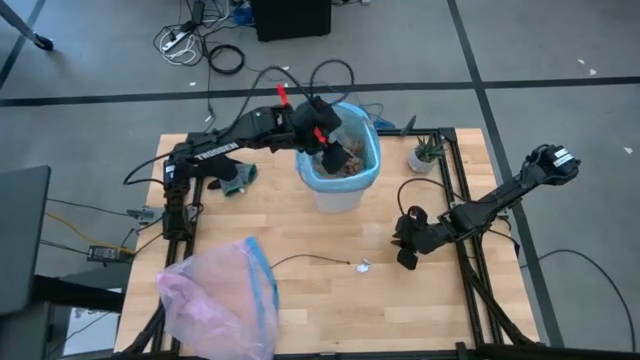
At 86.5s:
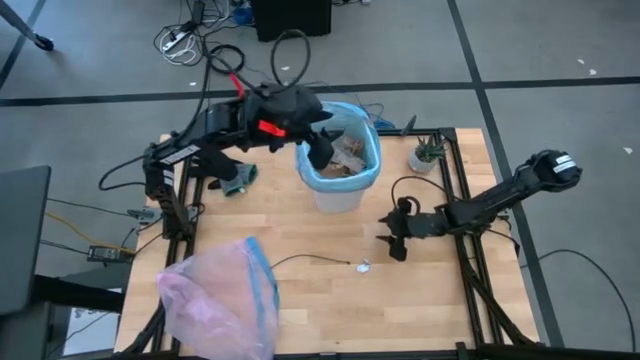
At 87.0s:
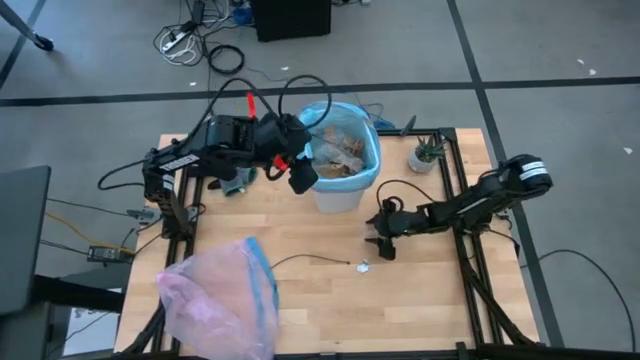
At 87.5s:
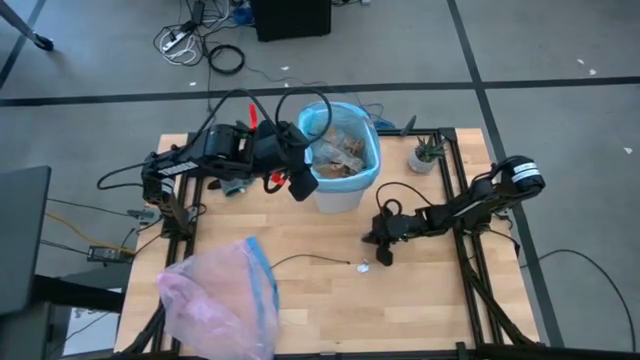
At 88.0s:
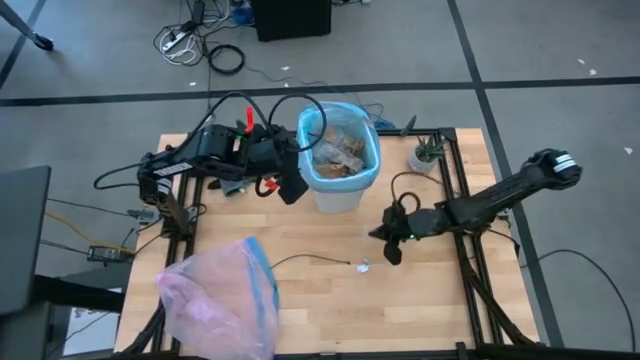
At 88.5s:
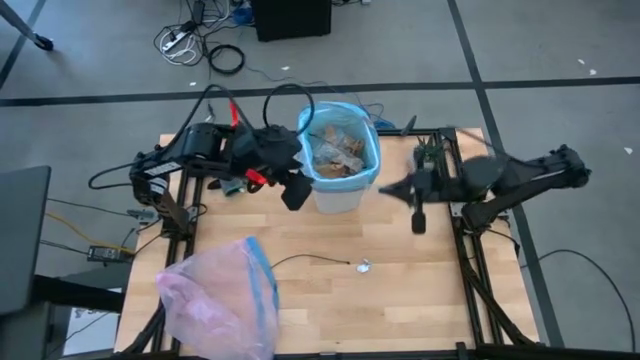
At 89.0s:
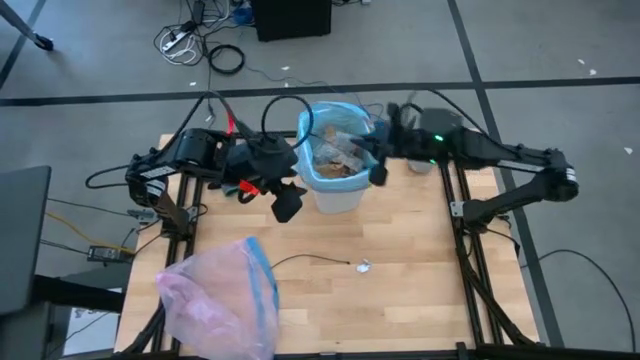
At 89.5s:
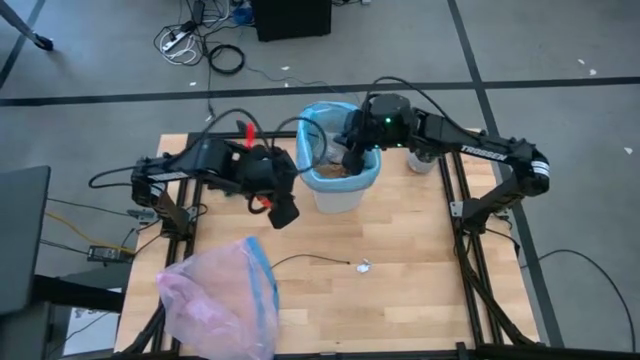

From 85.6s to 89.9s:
Task: place trash/remove bag and relplace
Put the transparent plastic into the trash bin

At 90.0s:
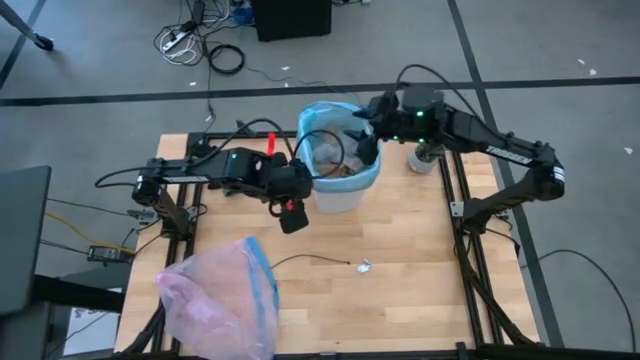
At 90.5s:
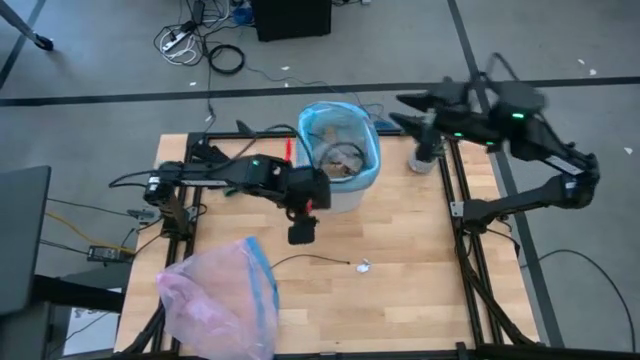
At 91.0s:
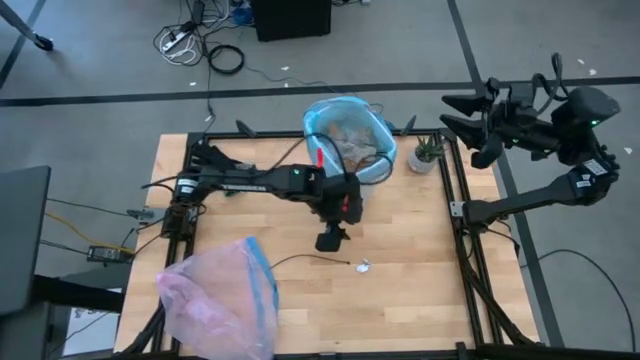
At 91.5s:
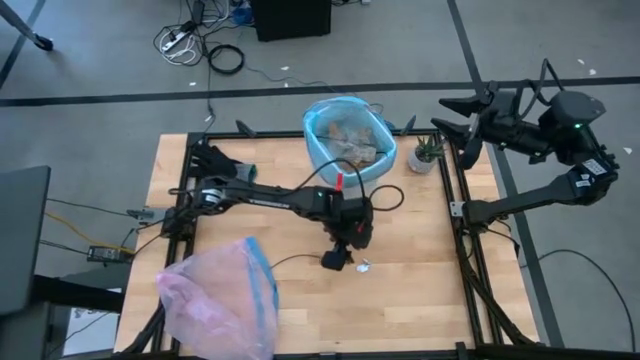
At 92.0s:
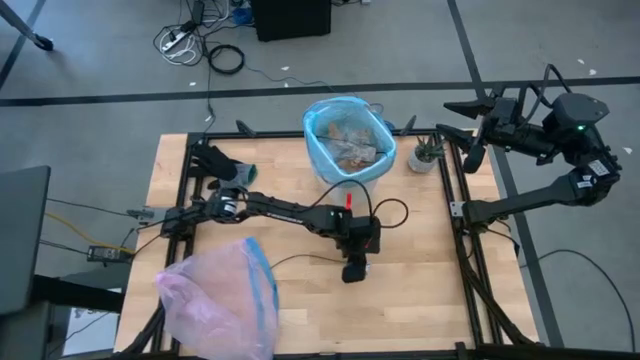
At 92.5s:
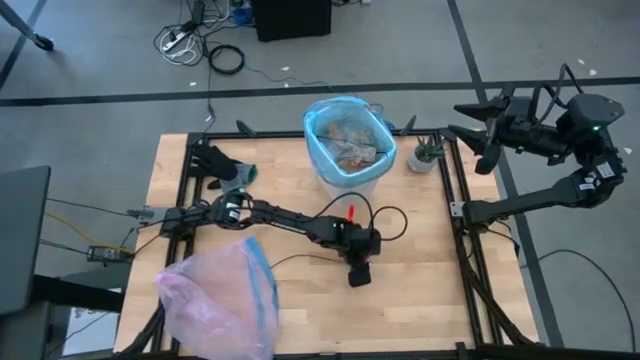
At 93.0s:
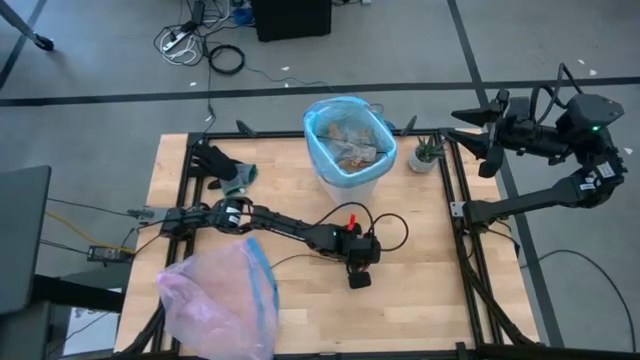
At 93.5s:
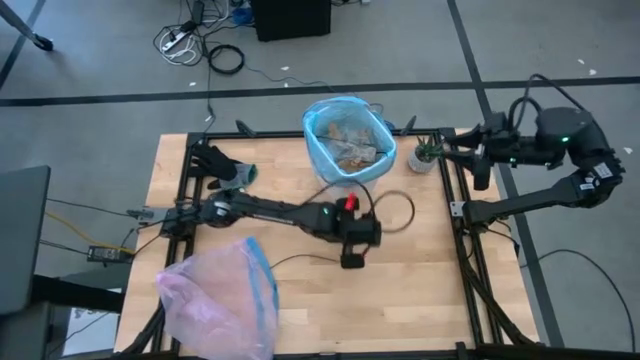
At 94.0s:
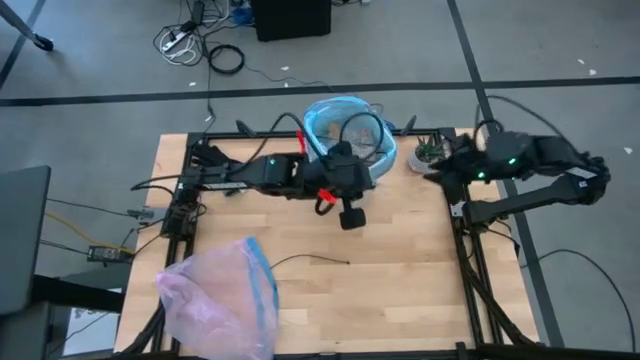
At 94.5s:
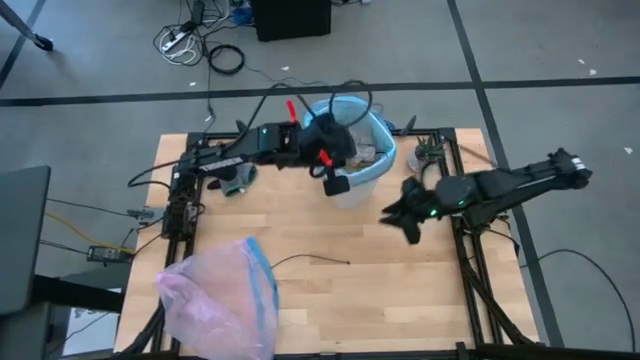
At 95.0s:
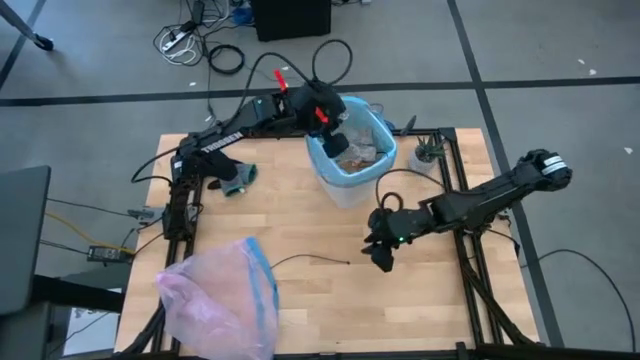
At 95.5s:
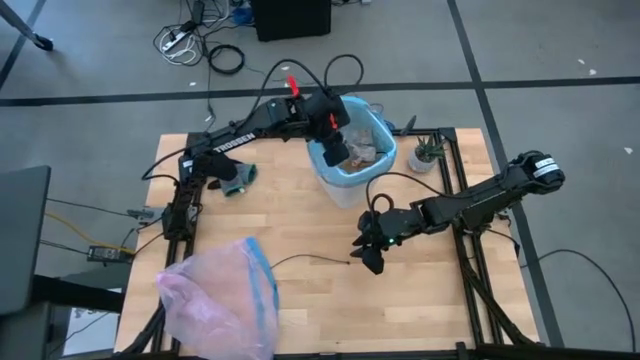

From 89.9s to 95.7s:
Put the white paper into the trash bin

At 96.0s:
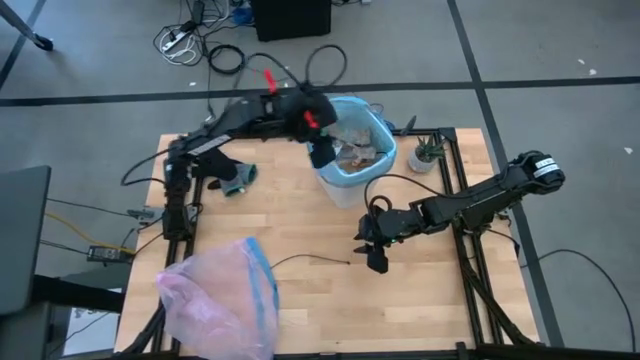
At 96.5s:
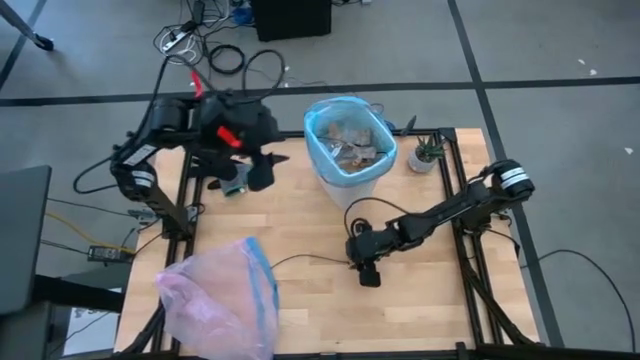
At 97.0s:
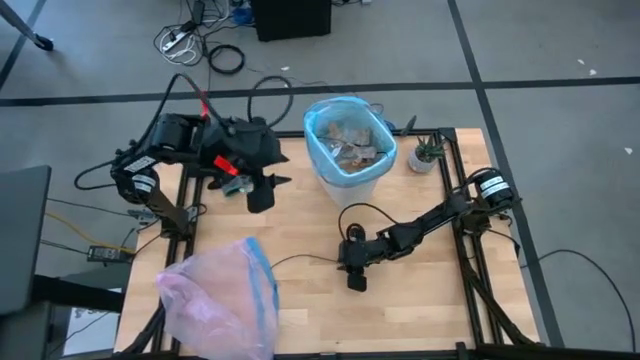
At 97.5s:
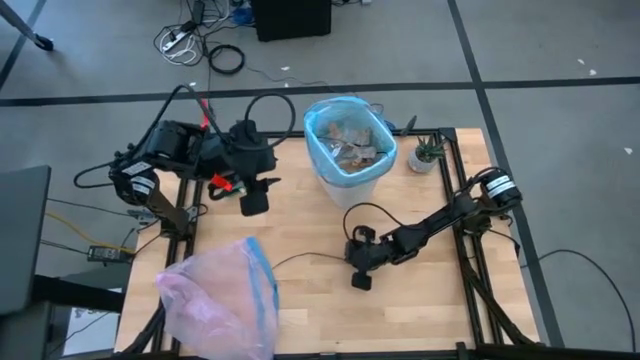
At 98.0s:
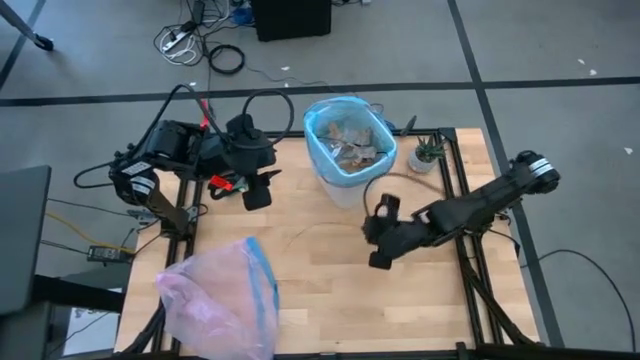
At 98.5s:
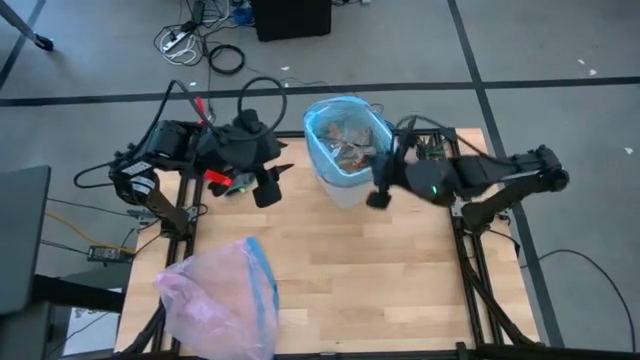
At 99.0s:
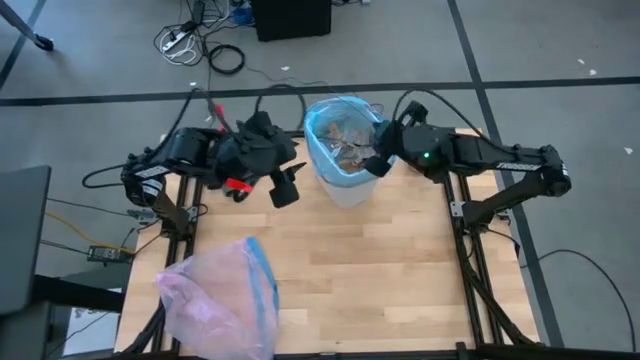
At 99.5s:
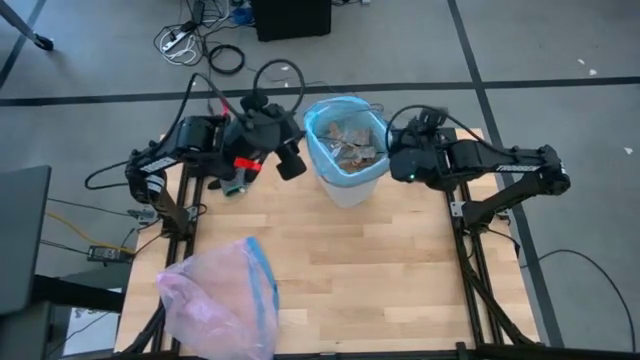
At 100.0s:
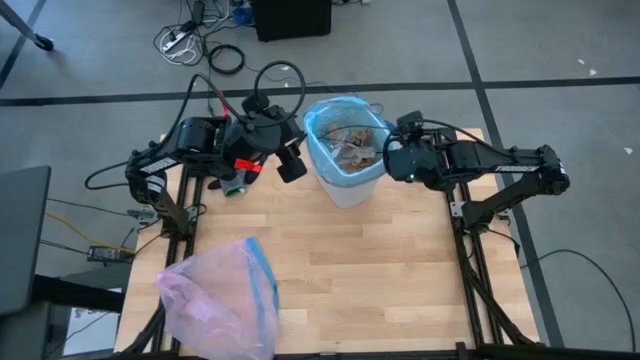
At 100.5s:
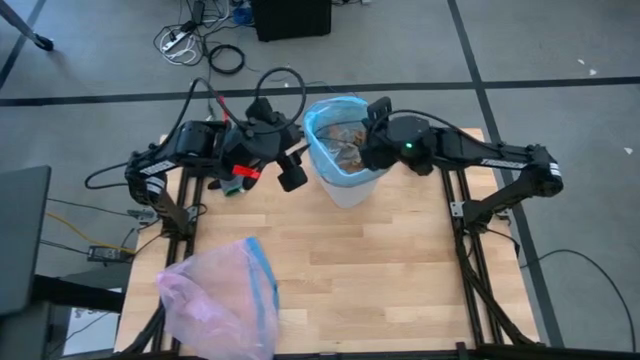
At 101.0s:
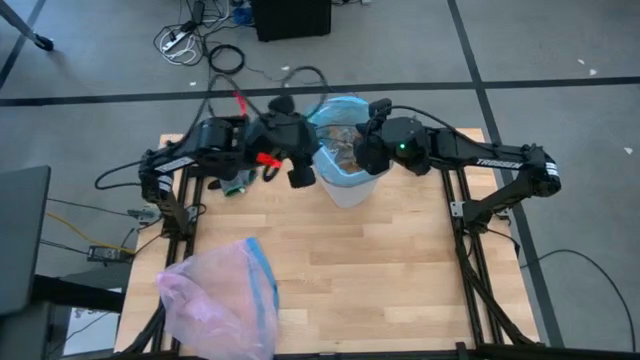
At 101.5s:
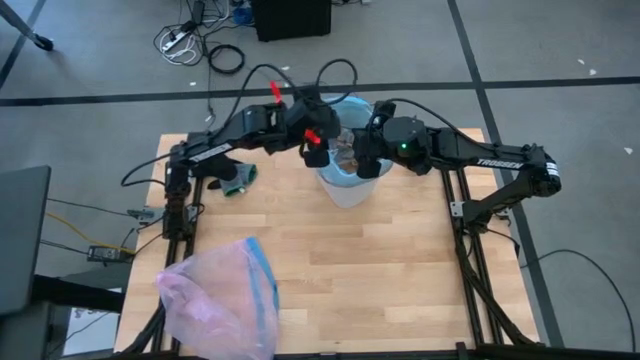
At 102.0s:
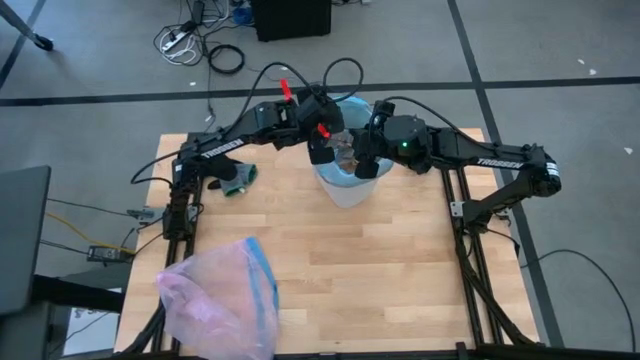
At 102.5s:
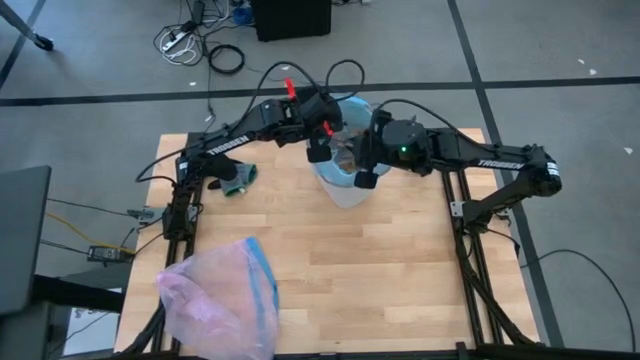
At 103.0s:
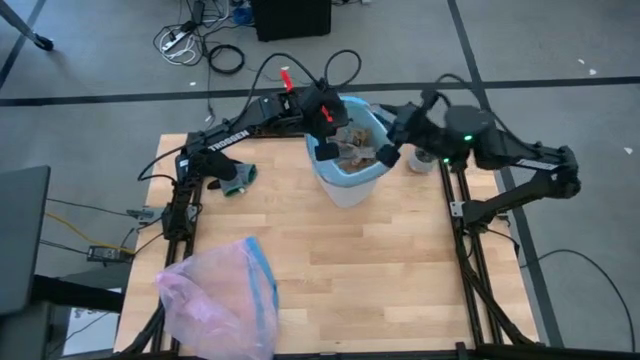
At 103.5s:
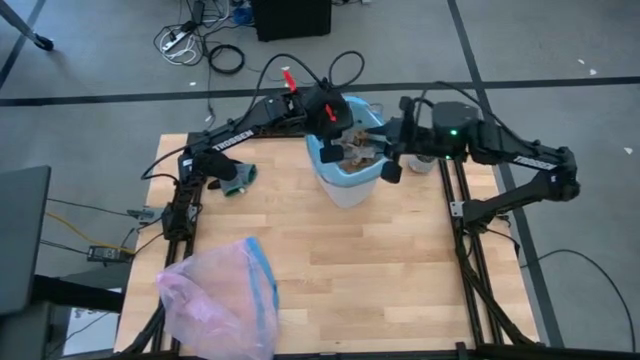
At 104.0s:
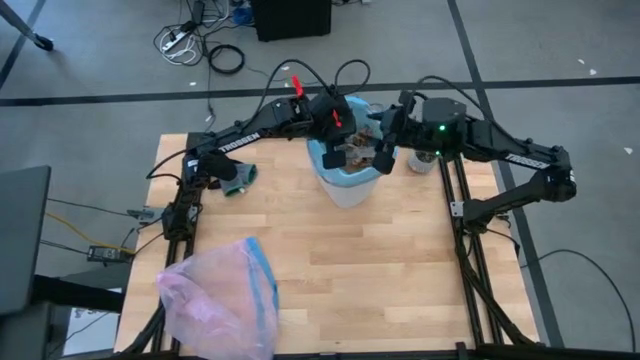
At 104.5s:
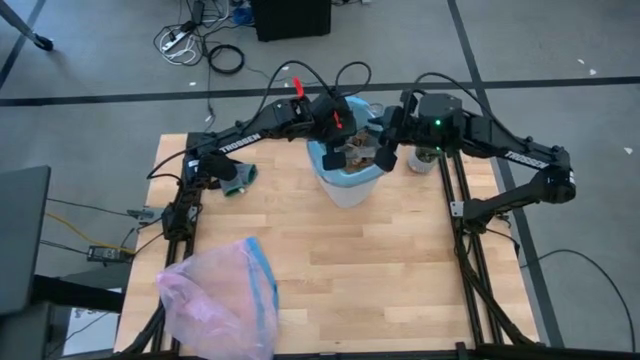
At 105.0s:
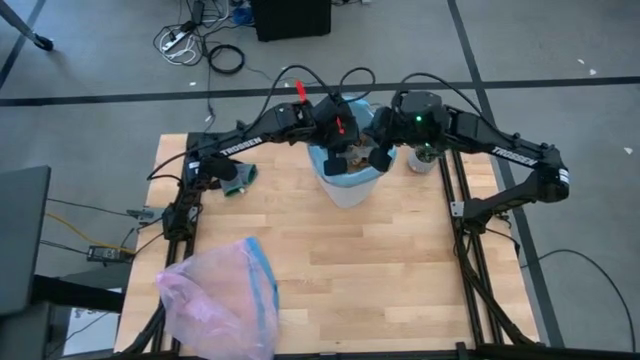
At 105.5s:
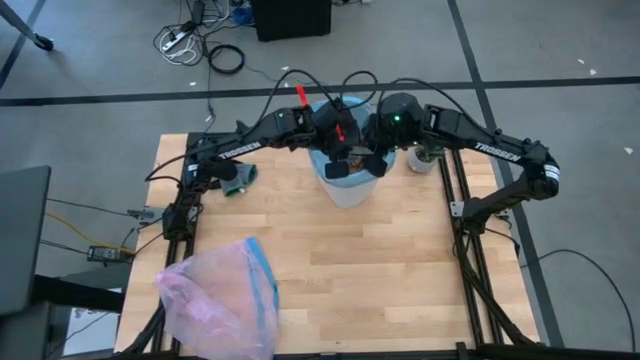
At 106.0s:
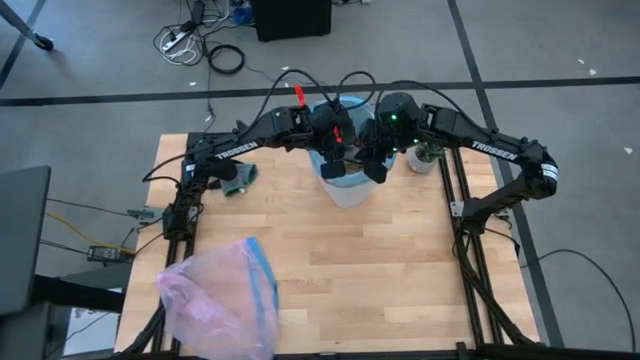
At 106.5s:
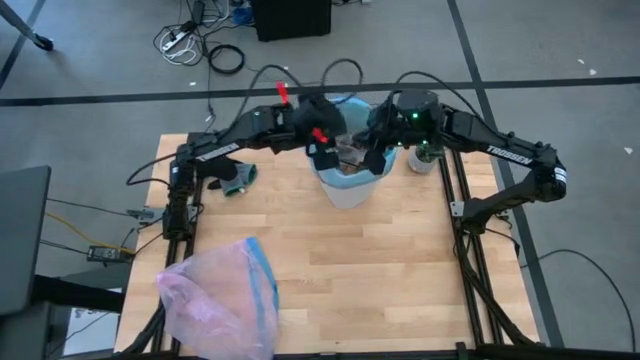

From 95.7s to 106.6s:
Put the cable tie into the trash bin

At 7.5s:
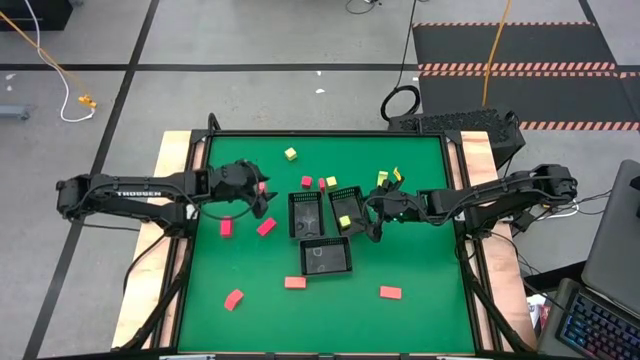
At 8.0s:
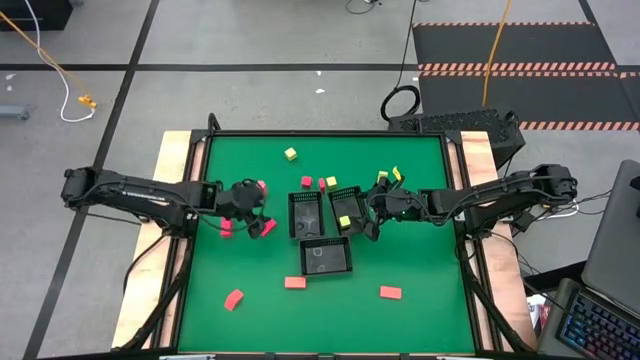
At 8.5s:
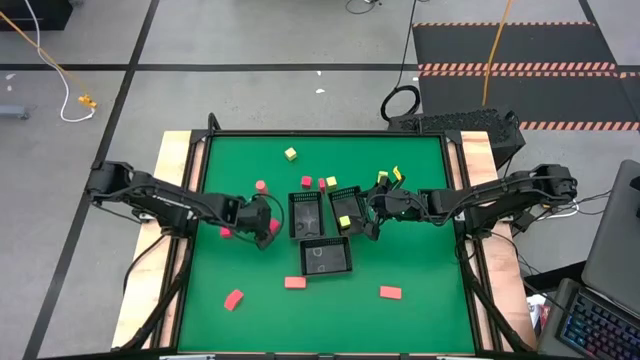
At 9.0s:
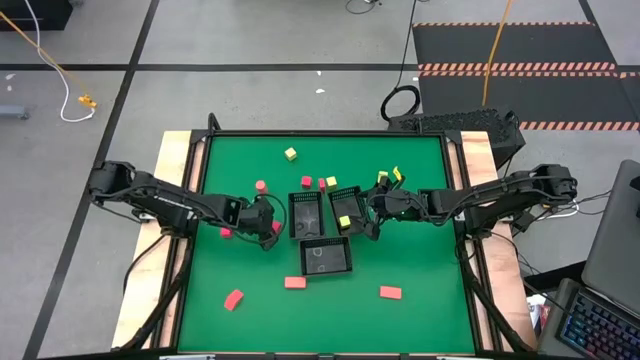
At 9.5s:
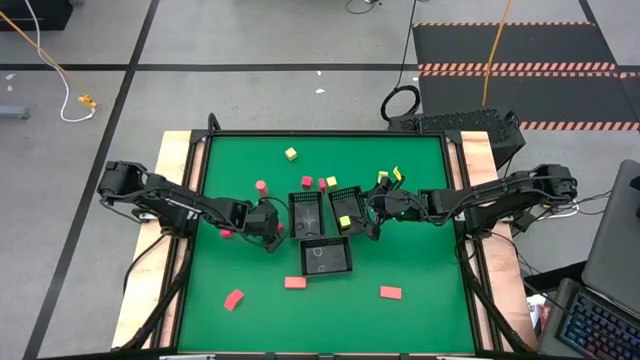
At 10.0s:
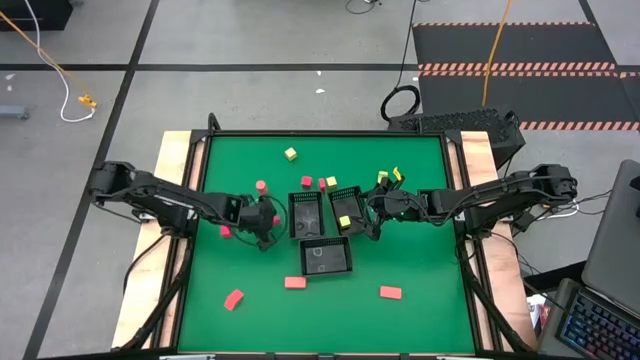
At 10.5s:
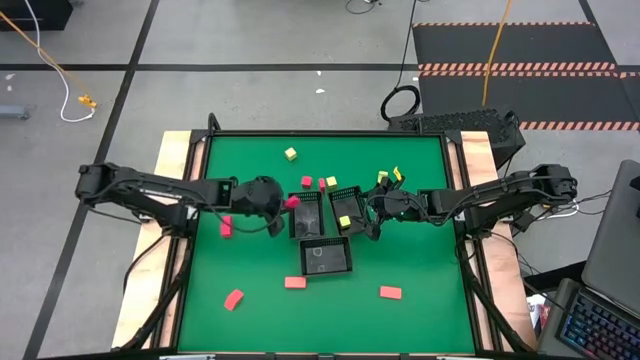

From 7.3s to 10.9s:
Task: Sort & place blocks by color
Put the red block into the top left black bin
